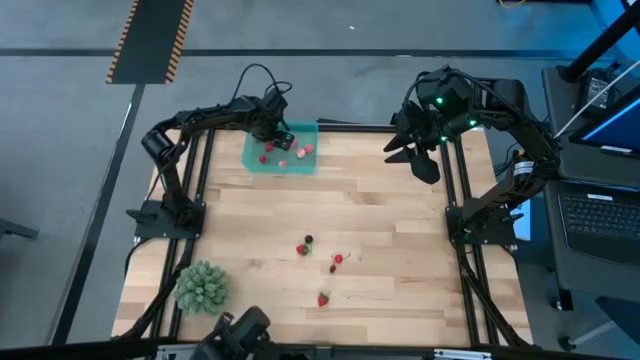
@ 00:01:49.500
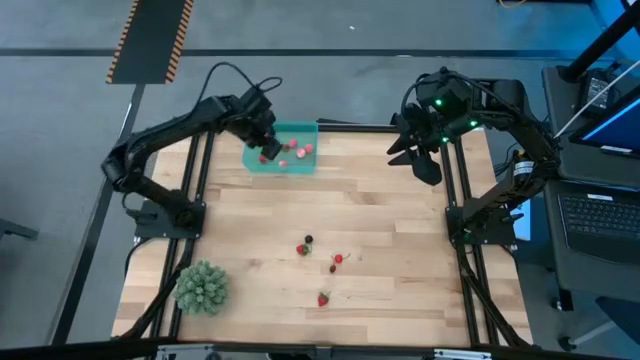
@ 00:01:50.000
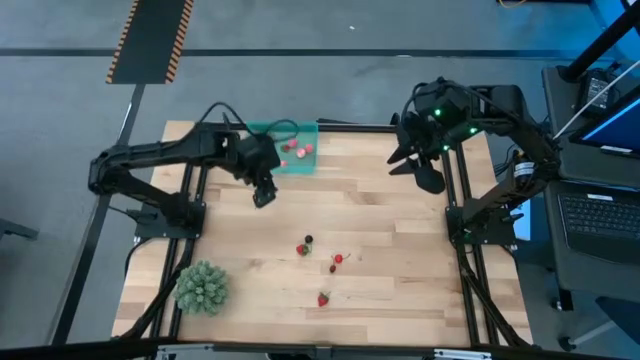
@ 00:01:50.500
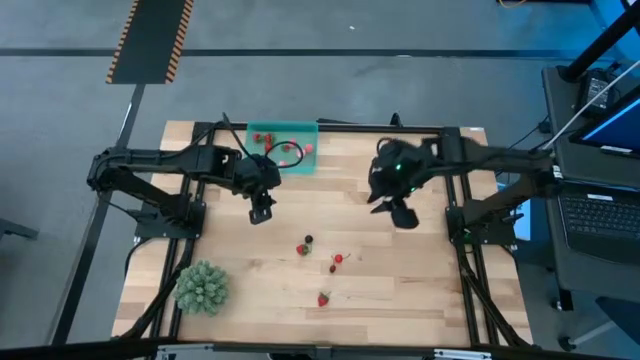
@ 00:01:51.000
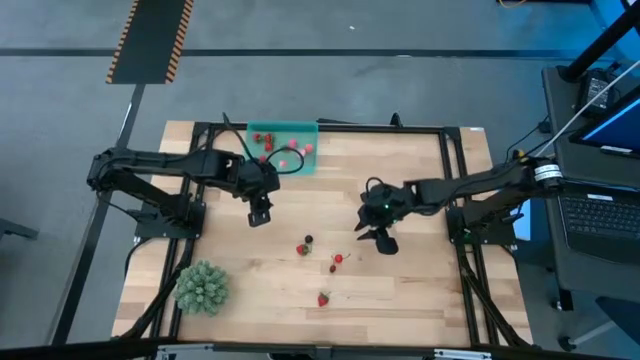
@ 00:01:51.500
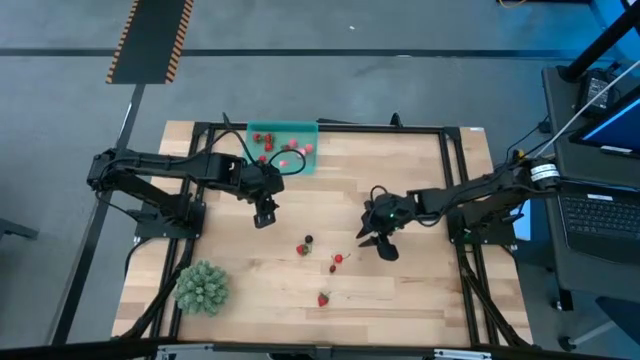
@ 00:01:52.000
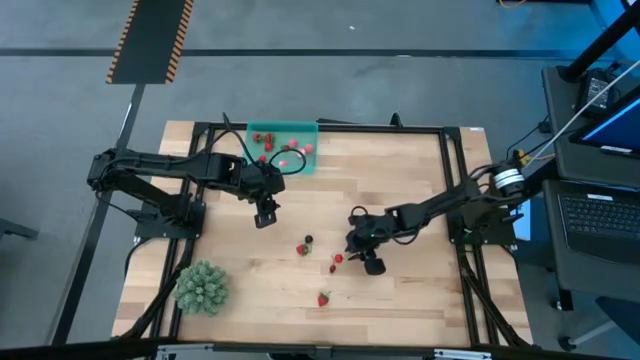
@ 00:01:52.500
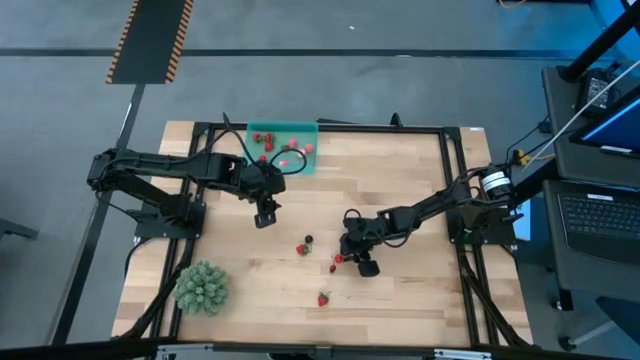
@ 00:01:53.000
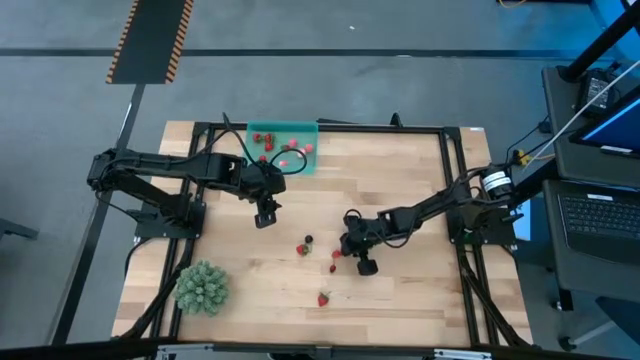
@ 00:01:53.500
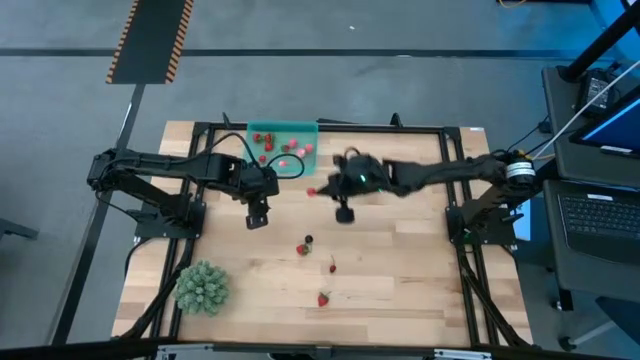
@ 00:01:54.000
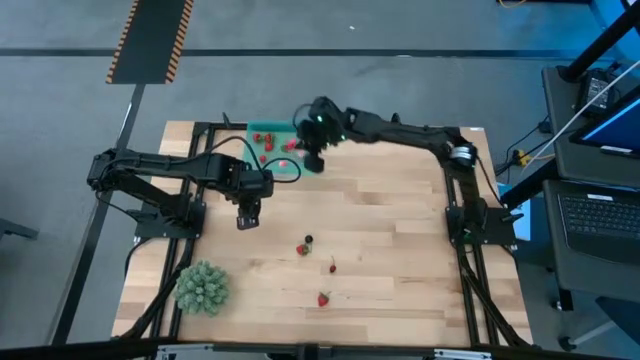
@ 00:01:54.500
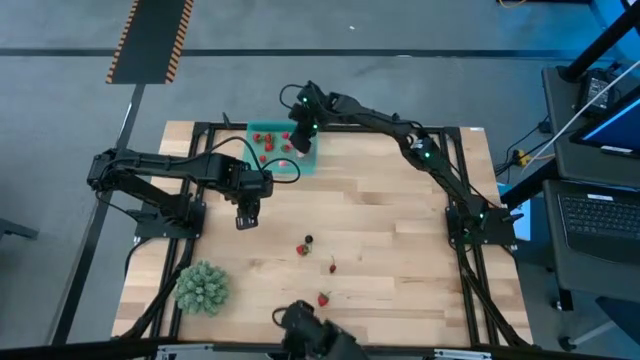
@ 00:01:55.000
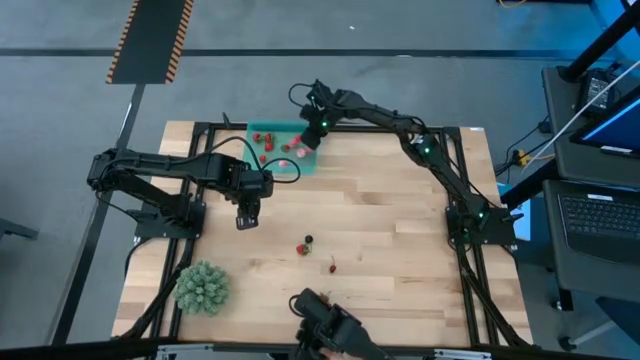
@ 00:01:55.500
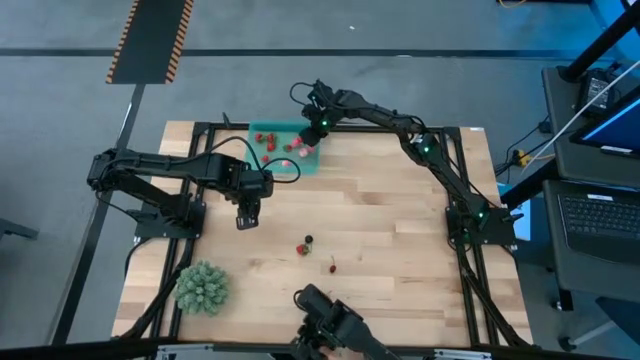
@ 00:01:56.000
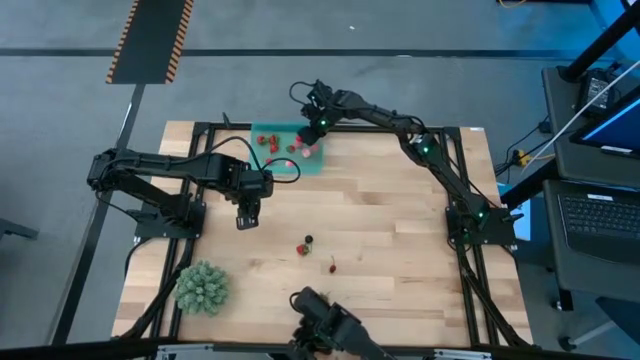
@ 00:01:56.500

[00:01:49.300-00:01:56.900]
Task: Pick and placing Produce into tupperware
Put the red cherry into the blue bin

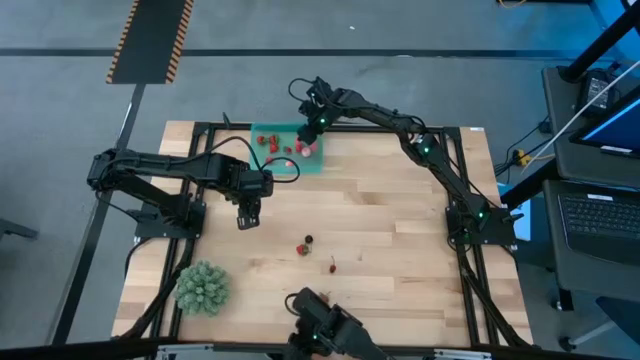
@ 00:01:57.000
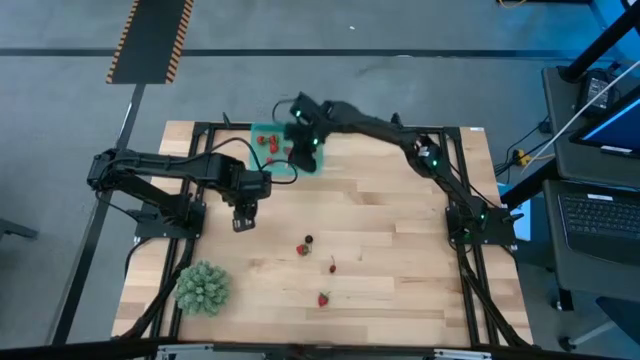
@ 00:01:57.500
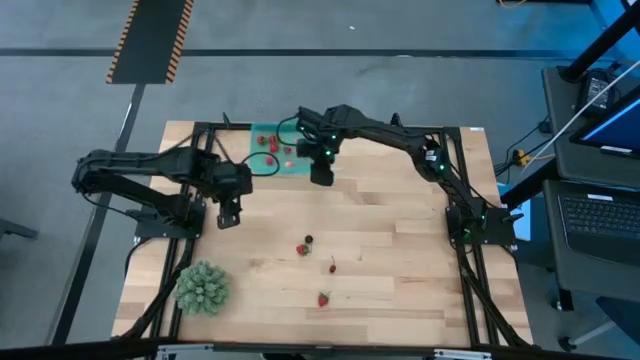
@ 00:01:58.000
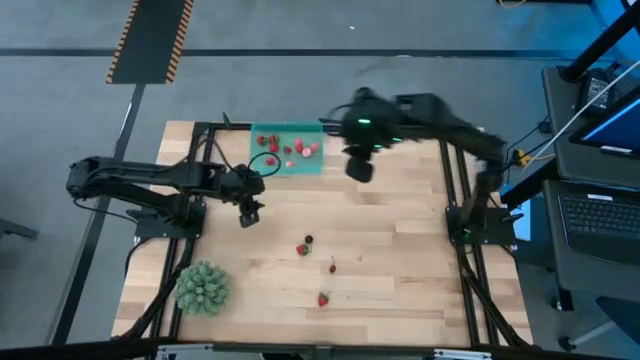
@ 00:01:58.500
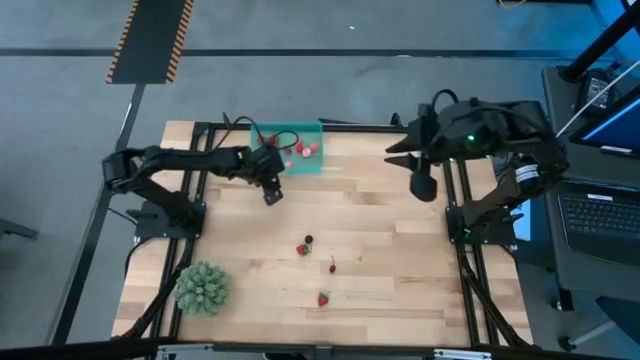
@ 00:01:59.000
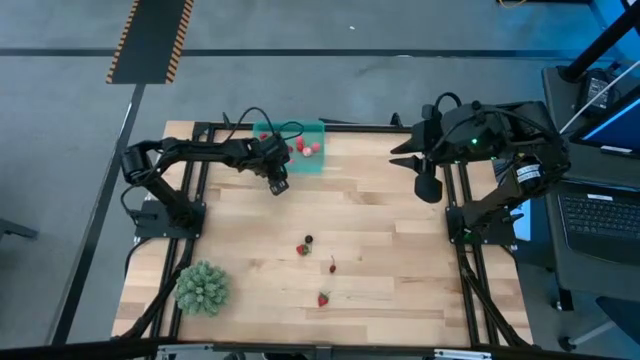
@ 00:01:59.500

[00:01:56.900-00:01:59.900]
Adjust the blue bin on the table

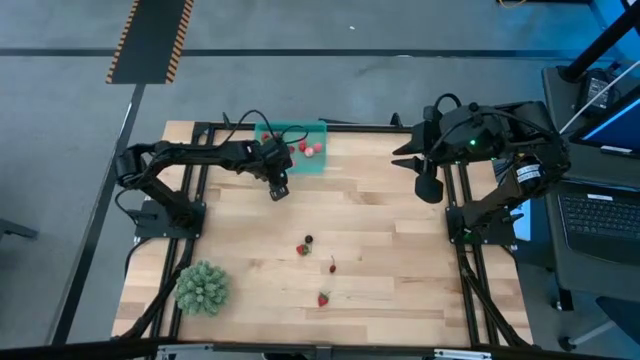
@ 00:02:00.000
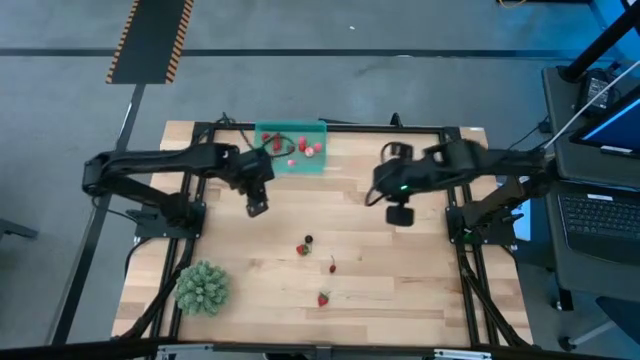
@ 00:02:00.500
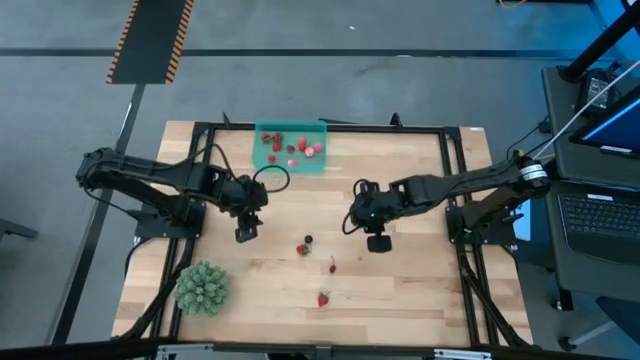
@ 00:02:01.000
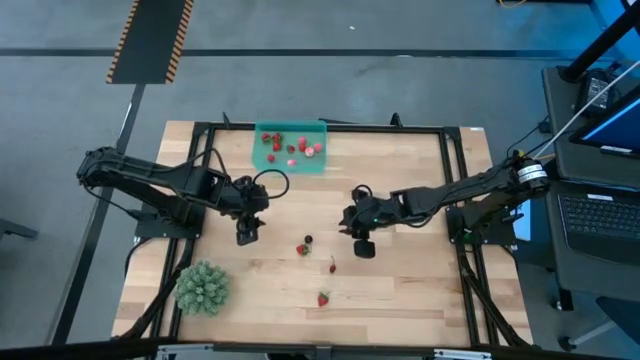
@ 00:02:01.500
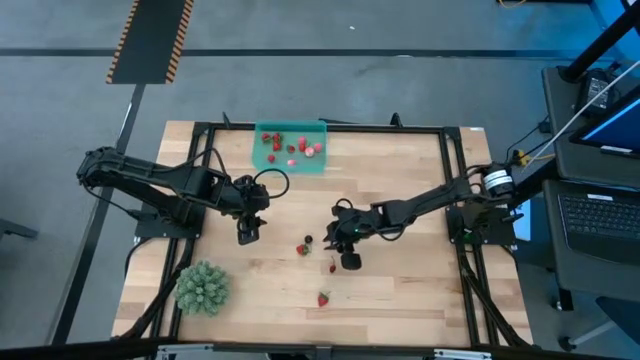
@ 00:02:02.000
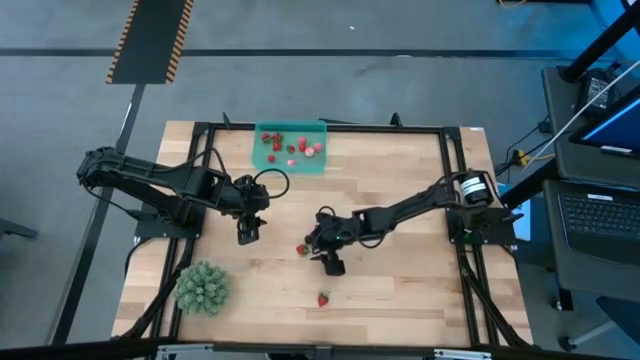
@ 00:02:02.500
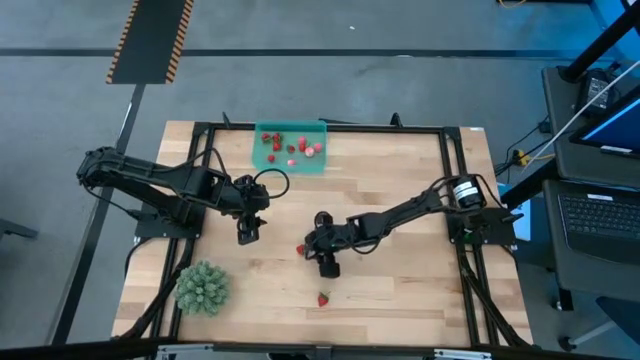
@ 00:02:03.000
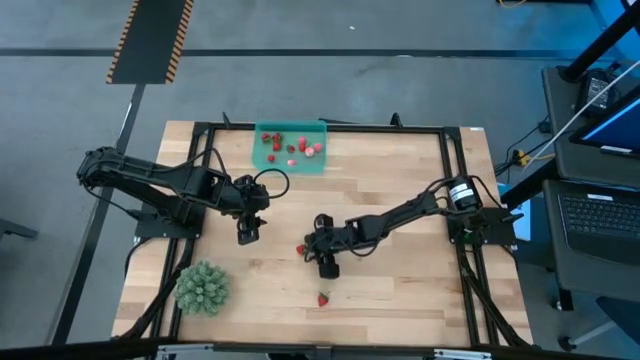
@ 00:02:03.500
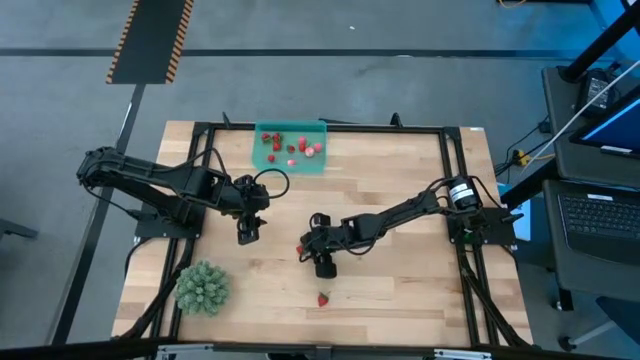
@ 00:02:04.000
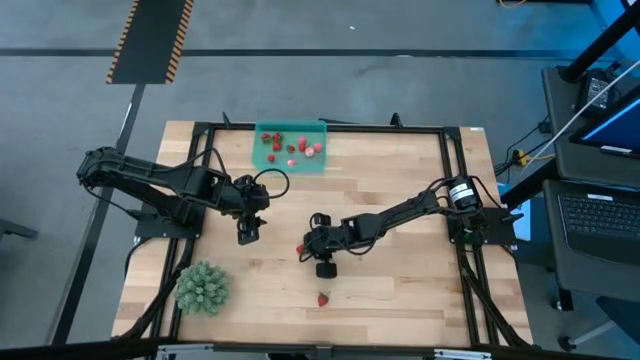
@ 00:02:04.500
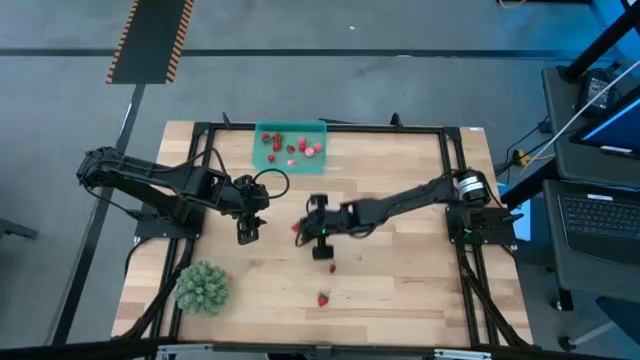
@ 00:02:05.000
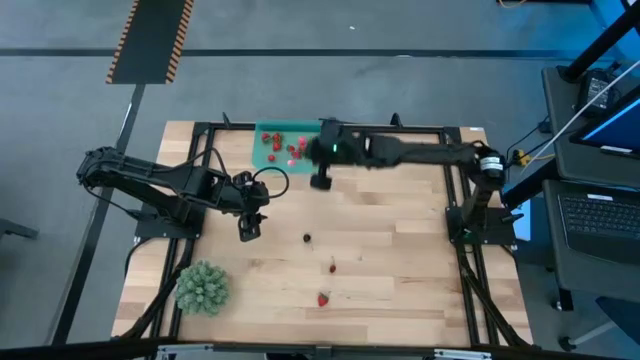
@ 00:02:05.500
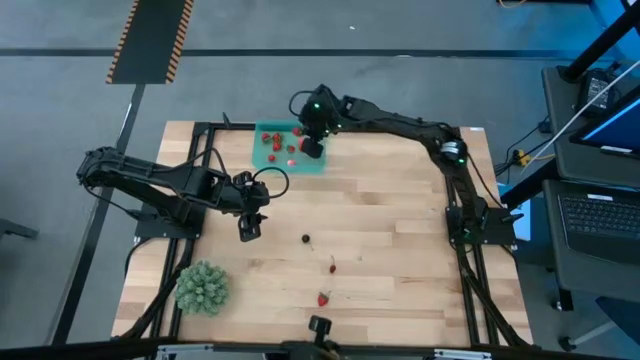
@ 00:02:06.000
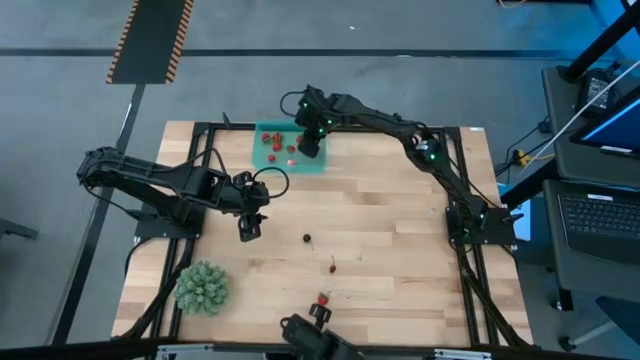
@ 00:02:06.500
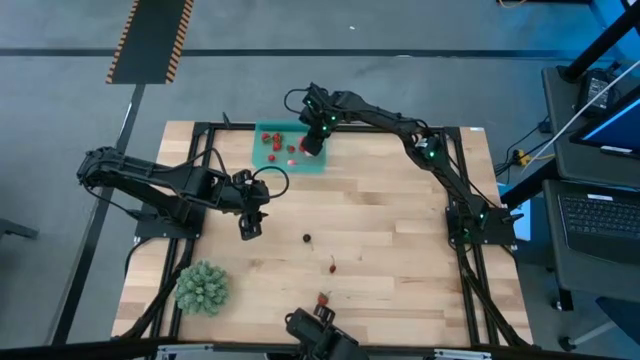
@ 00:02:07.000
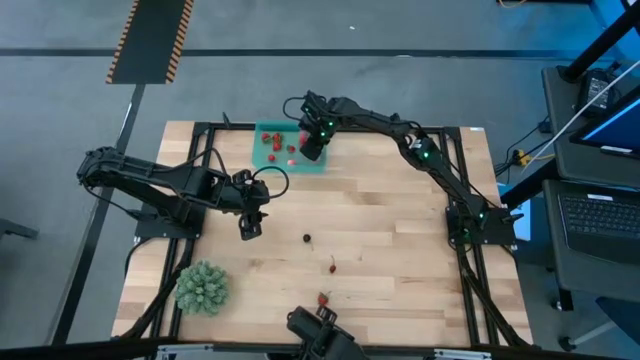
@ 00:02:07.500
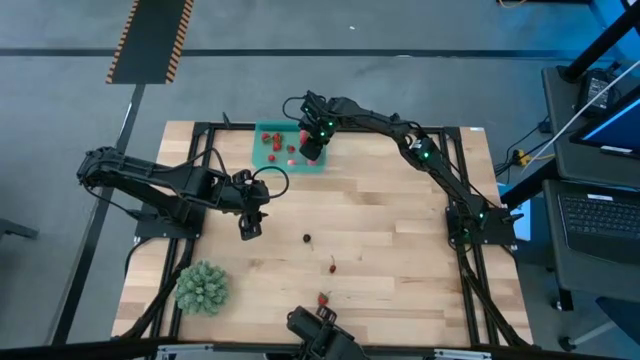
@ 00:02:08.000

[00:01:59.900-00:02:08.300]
Put the red strawberry into the blue bin
